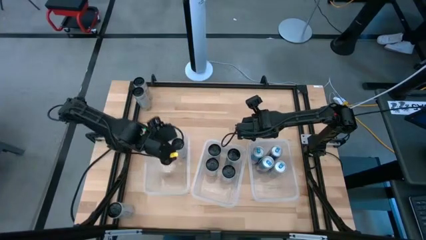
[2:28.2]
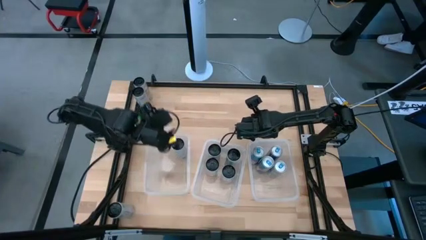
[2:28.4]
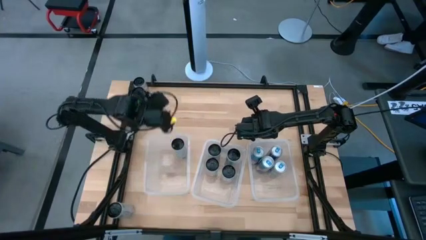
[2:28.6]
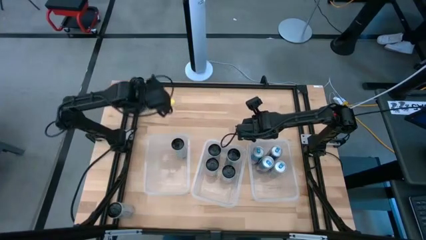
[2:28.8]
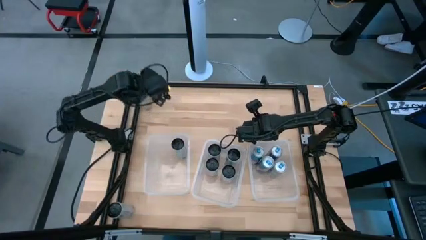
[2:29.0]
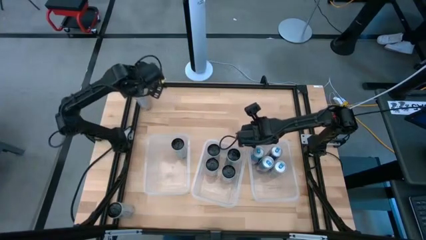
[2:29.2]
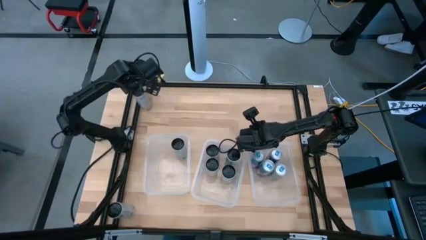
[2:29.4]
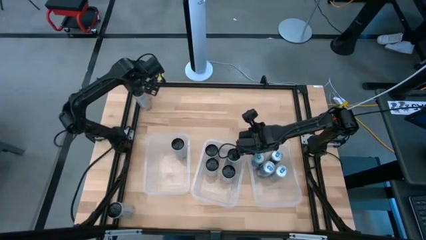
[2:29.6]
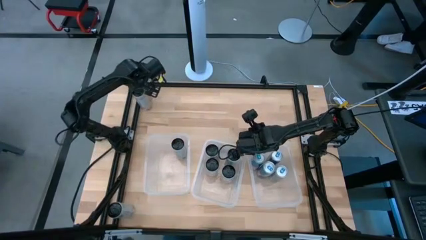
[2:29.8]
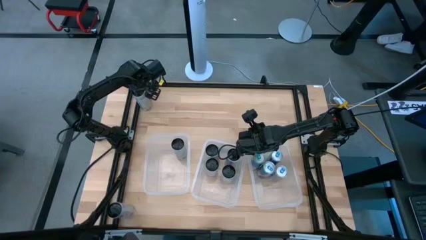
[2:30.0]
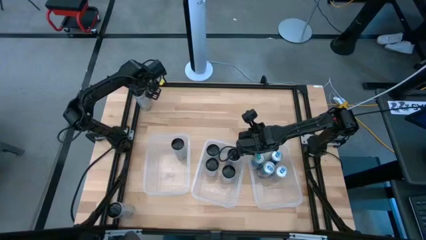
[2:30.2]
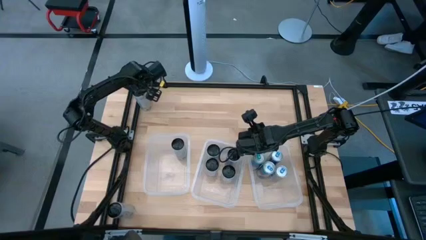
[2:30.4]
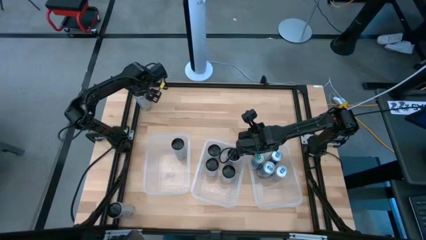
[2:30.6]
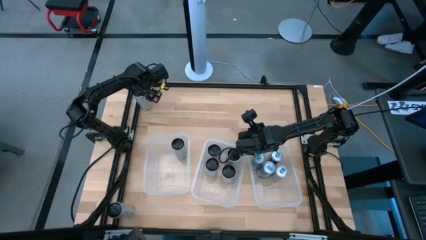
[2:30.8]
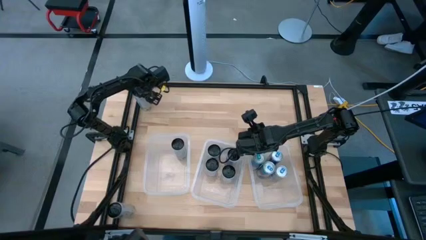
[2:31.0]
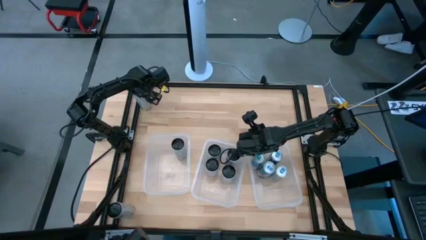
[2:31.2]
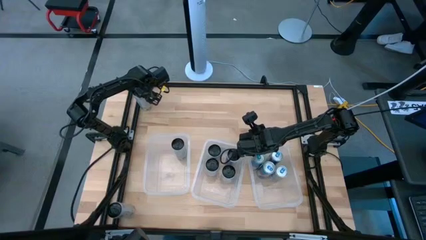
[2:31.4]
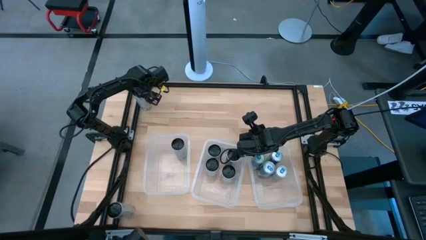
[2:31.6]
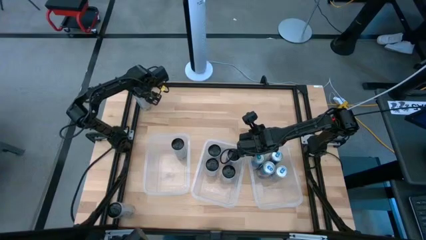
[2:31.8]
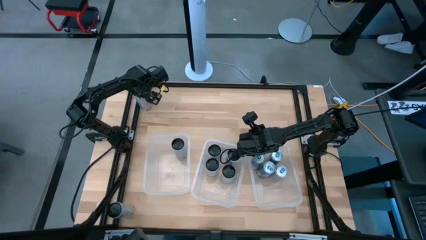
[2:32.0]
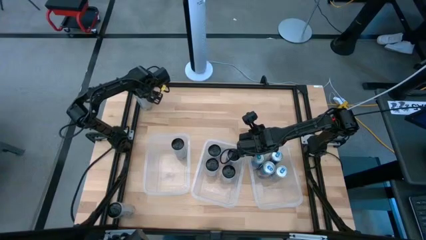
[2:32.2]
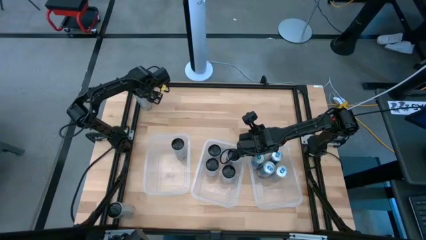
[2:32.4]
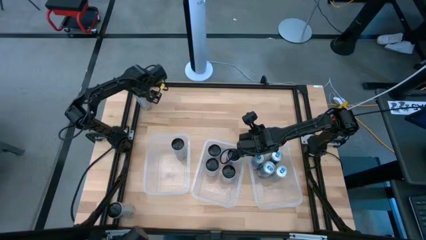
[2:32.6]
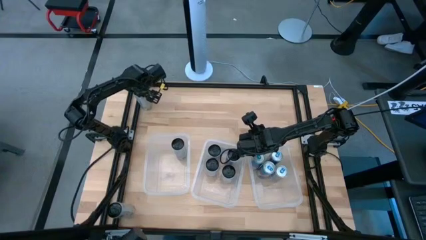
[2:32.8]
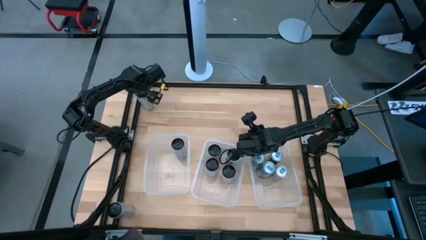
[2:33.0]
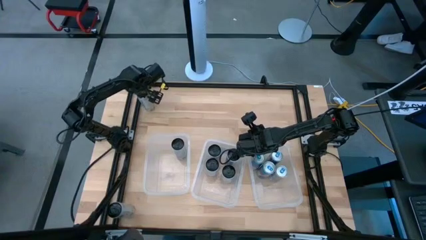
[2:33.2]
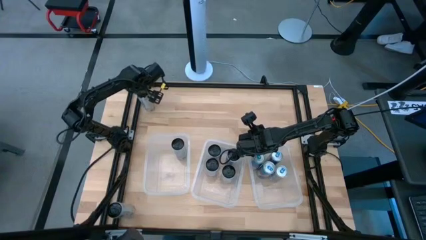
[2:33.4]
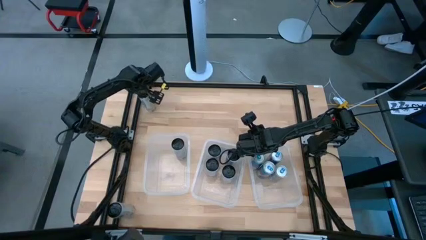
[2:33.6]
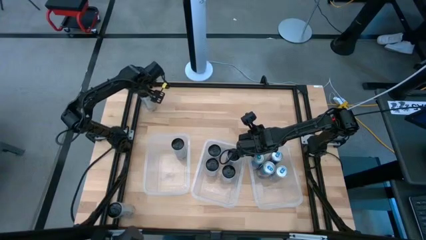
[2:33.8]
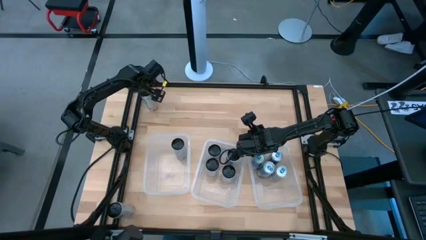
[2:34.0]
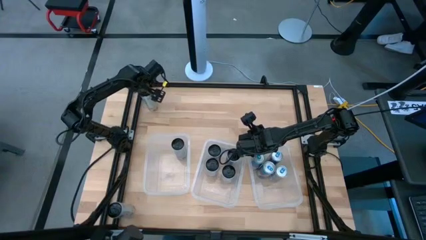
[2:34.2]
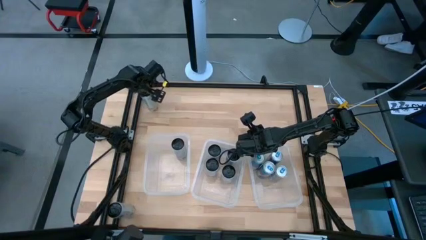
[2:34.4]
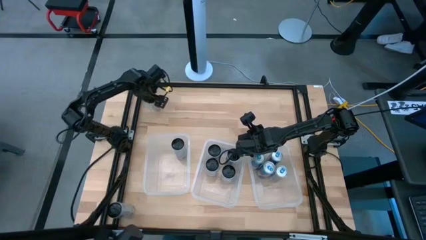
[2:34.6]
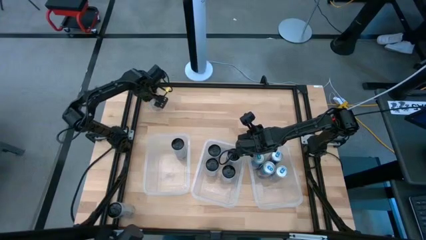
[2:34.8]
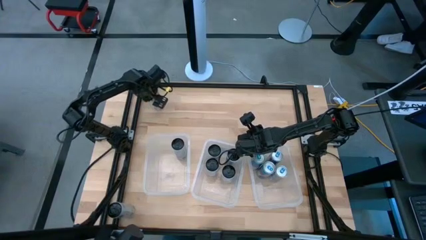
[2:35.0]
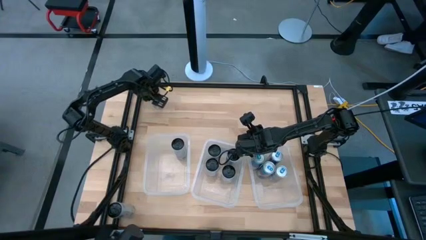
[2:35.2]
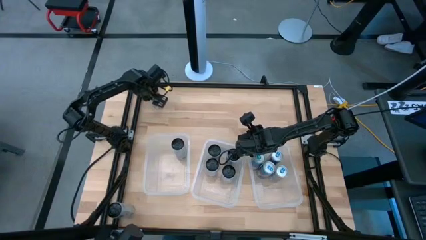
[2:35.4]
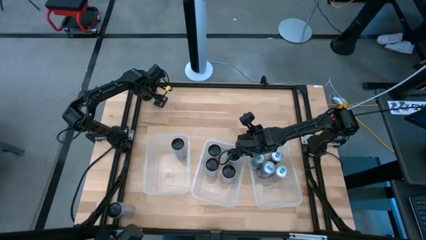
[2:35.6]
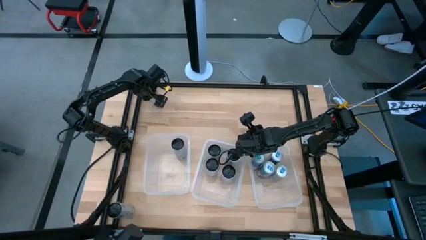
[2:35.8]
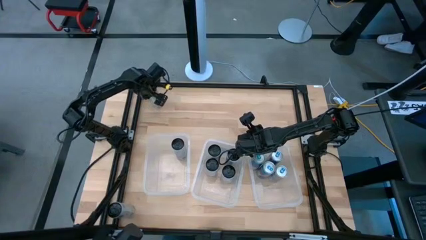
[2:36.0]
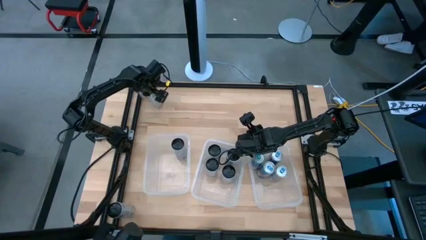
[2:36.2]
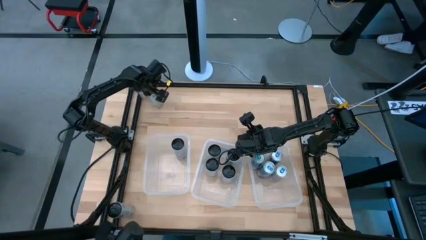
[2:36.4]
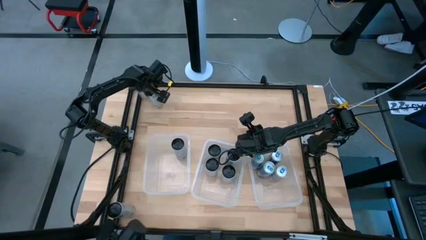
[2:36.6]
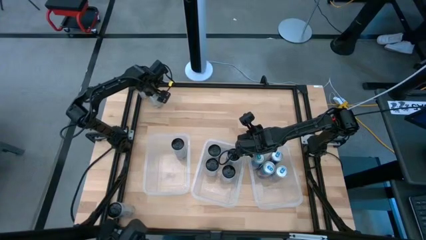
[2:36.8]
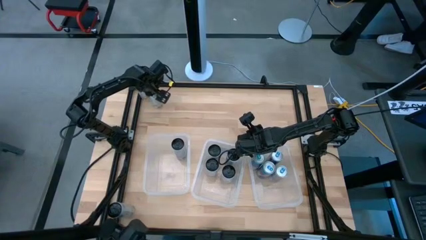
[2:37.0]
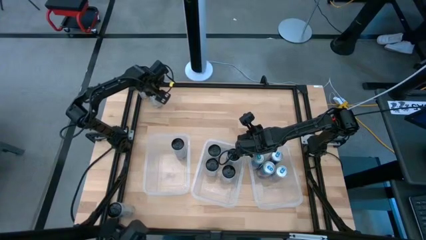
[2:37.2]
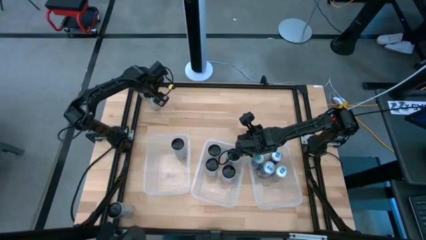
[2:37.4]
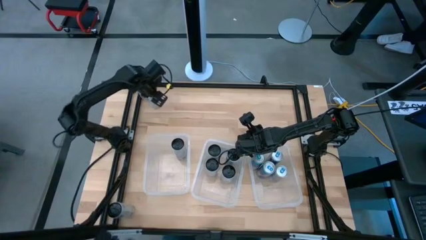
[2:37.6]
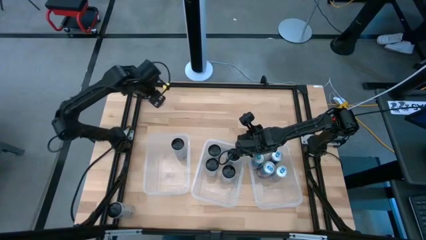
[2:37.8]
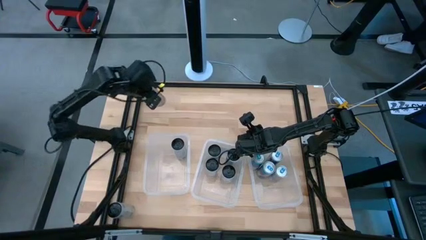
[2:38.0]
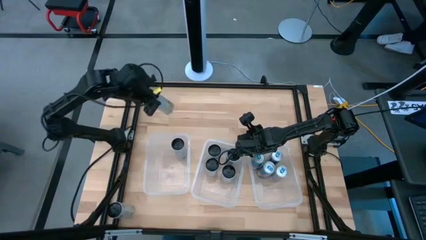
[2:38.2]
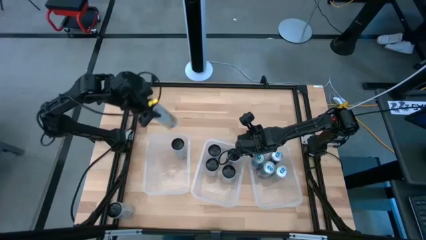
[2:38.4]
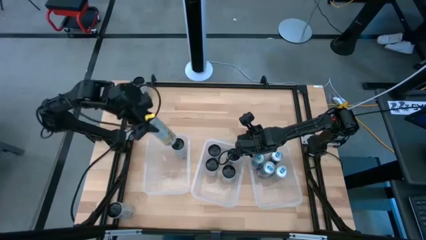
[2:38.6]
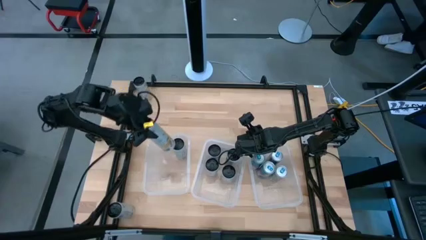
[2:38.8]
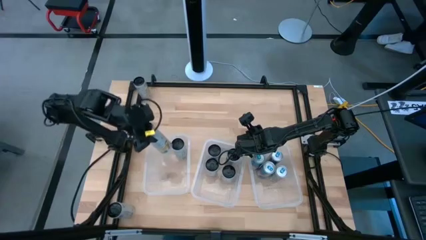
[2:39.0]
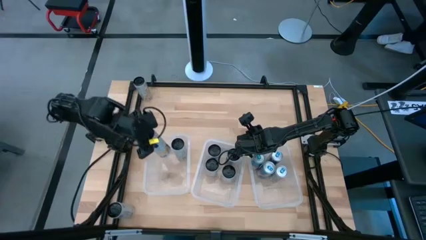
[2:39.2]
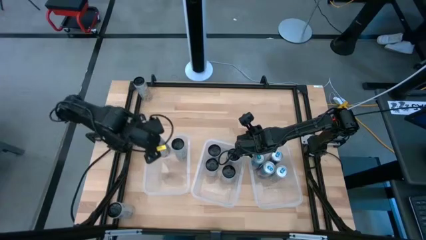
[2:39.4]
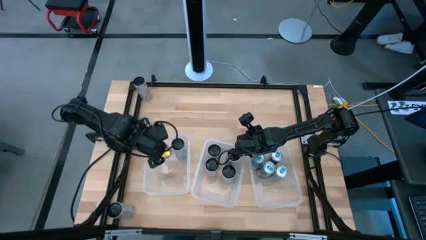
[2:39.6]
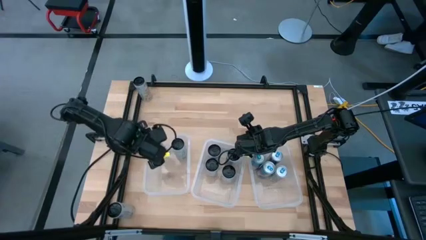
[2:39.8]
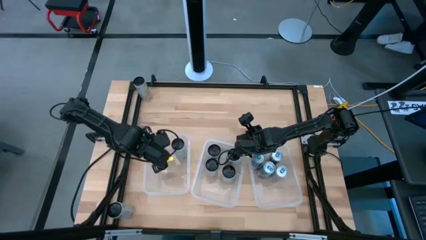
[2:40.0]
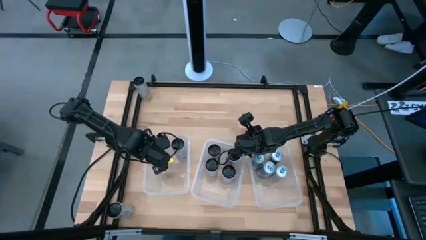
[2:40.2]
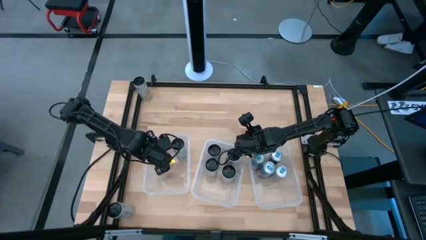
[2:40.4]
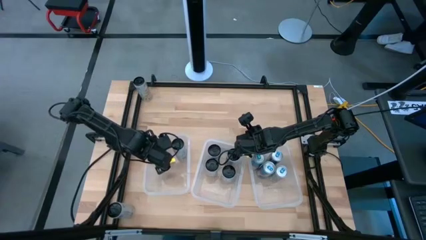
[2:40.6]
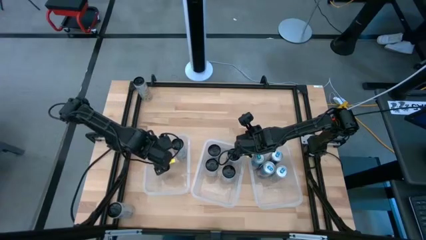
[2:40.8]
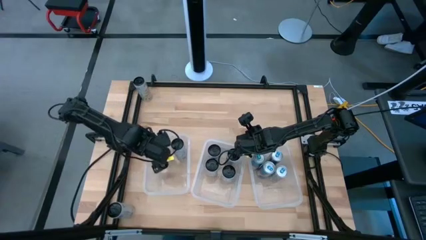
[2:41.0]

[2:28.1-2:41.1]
Task: Sort soda cans
Put the middle white-yellow soda can into the left transparent bin
